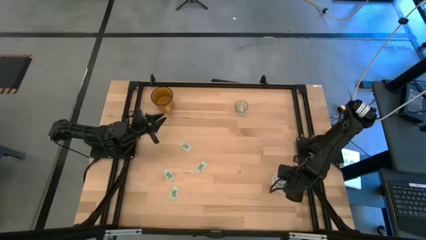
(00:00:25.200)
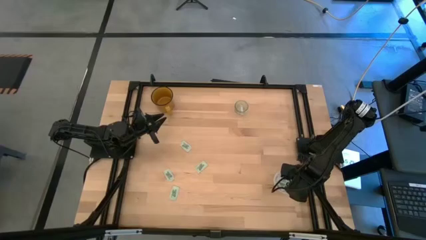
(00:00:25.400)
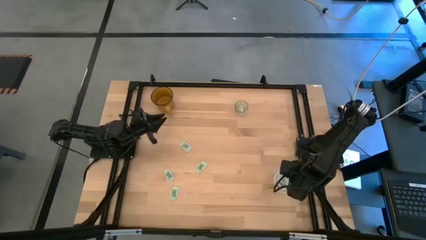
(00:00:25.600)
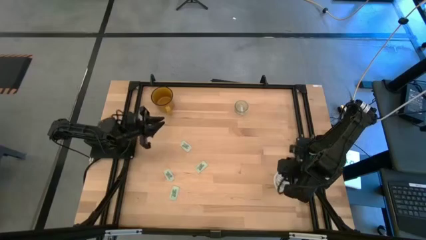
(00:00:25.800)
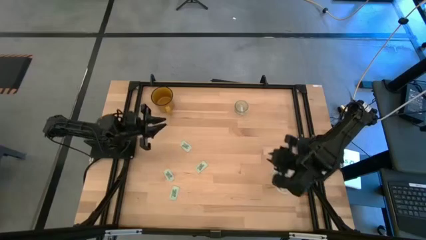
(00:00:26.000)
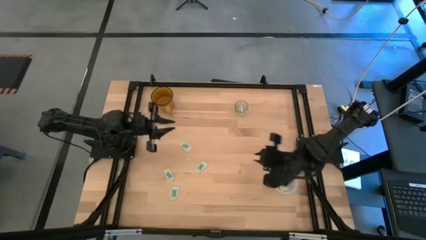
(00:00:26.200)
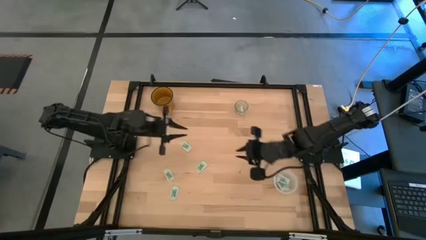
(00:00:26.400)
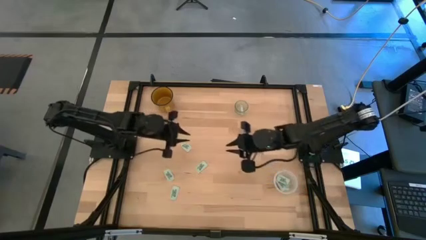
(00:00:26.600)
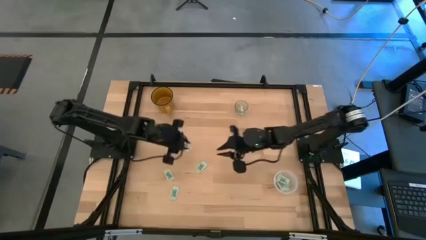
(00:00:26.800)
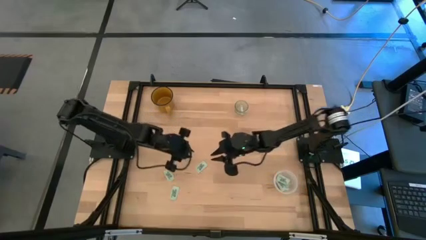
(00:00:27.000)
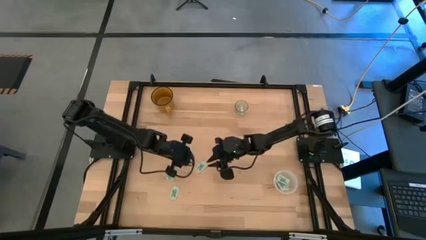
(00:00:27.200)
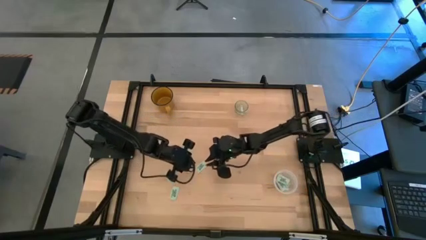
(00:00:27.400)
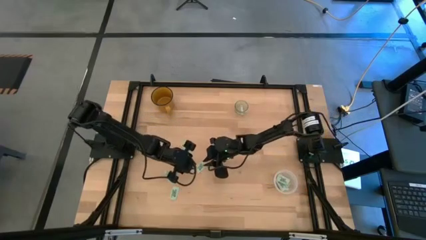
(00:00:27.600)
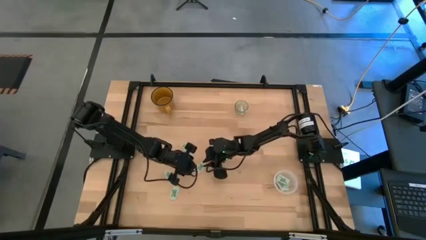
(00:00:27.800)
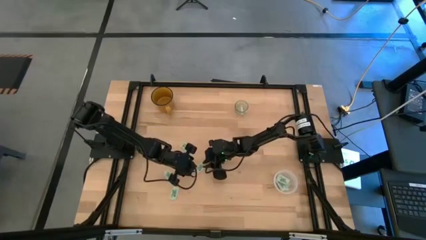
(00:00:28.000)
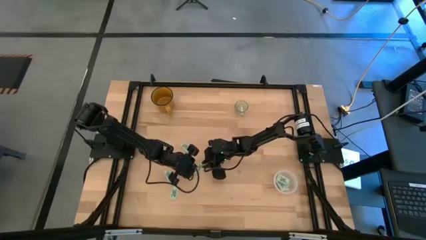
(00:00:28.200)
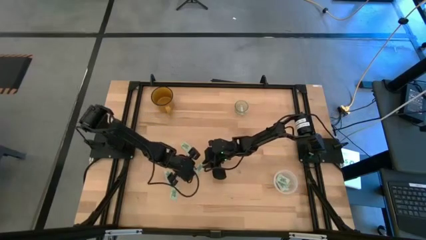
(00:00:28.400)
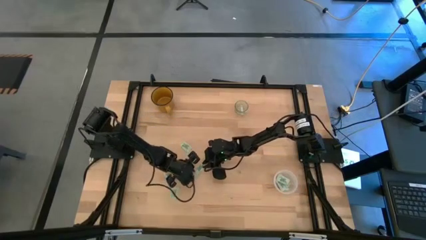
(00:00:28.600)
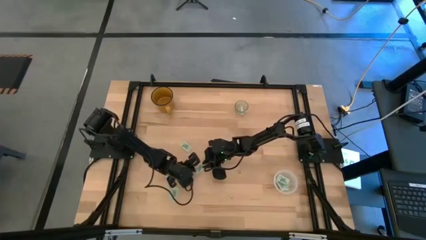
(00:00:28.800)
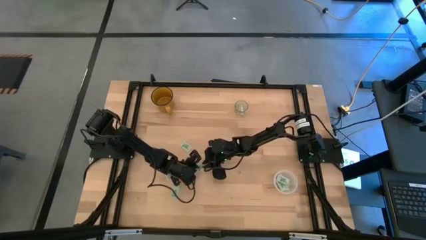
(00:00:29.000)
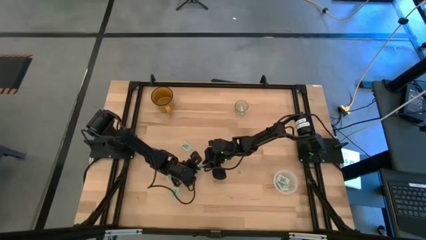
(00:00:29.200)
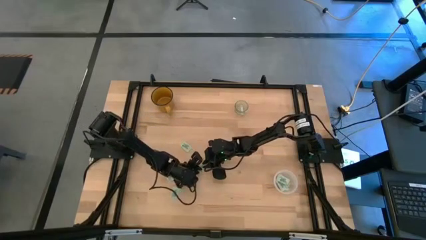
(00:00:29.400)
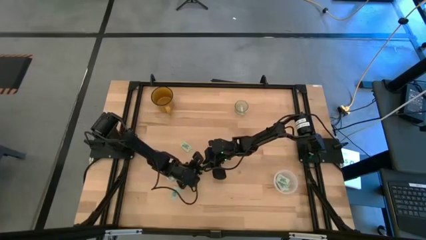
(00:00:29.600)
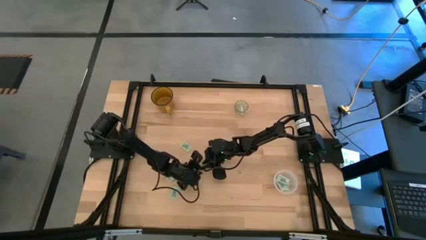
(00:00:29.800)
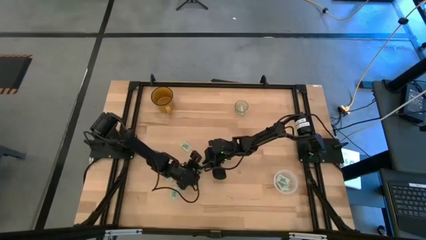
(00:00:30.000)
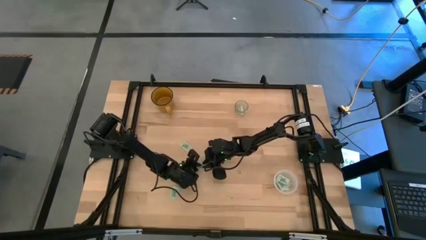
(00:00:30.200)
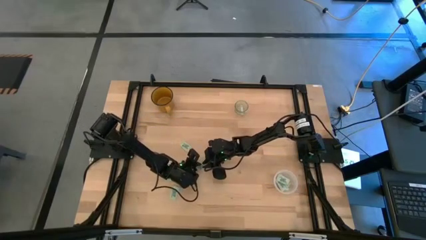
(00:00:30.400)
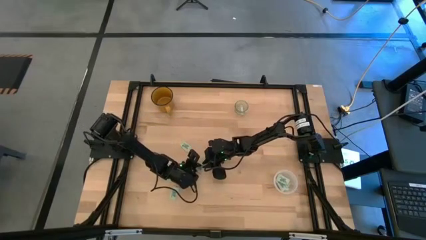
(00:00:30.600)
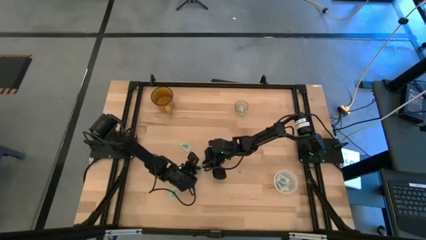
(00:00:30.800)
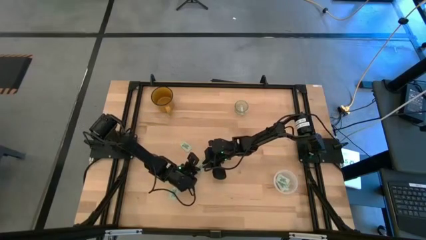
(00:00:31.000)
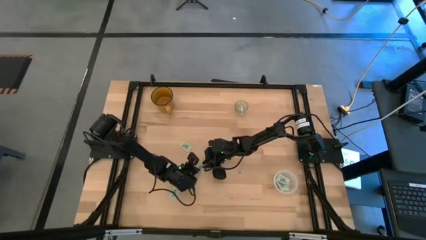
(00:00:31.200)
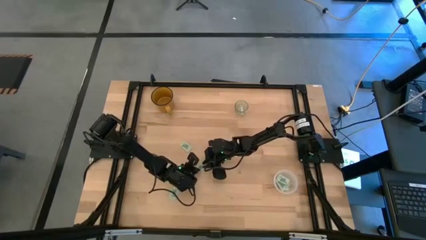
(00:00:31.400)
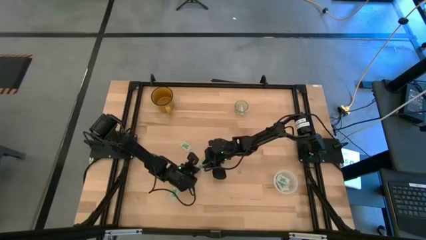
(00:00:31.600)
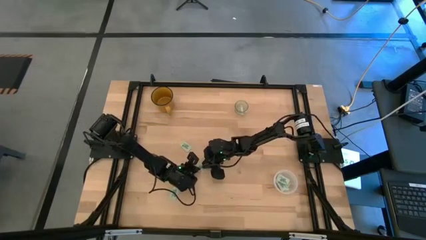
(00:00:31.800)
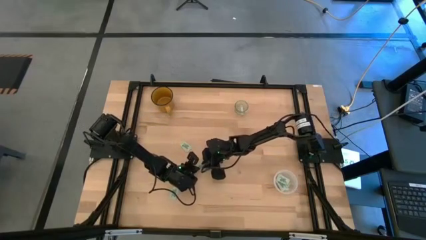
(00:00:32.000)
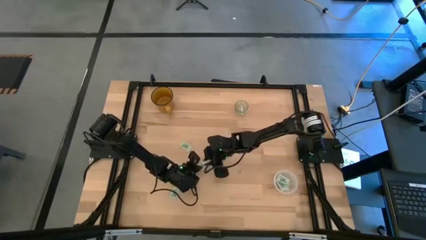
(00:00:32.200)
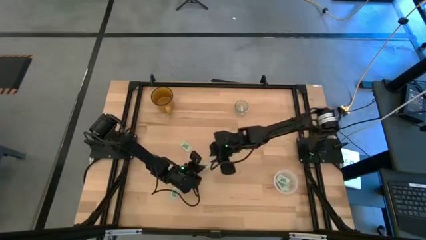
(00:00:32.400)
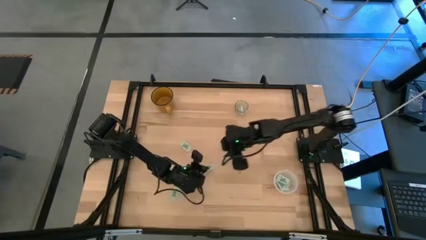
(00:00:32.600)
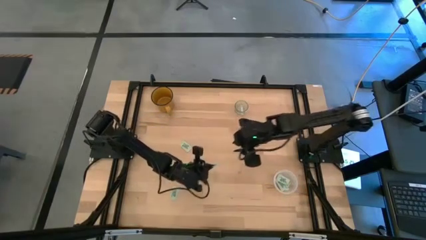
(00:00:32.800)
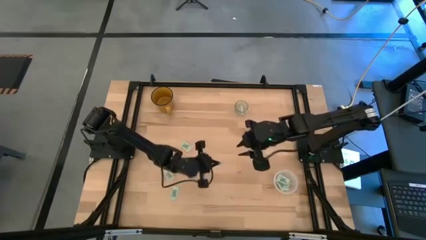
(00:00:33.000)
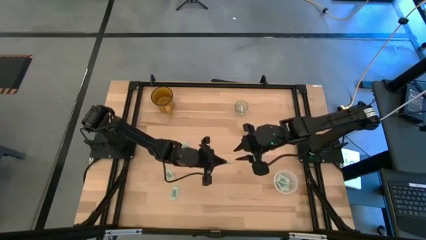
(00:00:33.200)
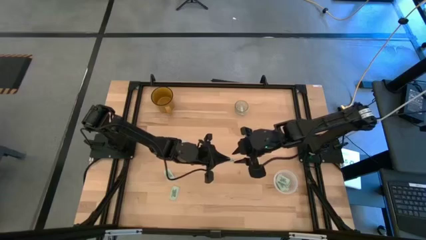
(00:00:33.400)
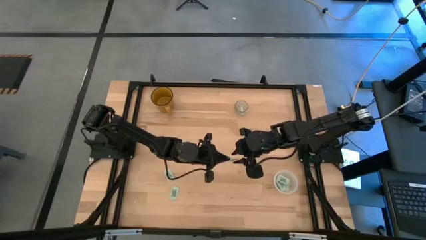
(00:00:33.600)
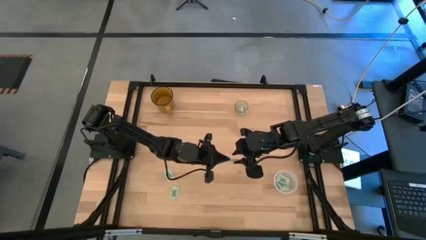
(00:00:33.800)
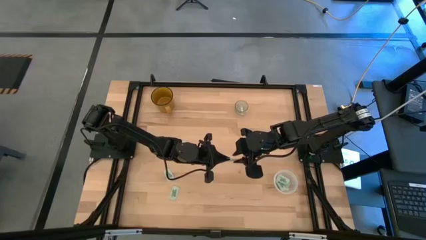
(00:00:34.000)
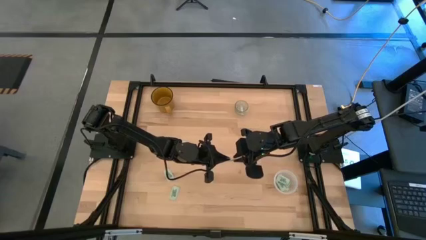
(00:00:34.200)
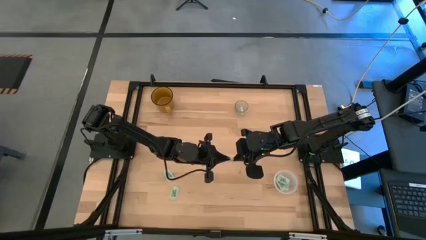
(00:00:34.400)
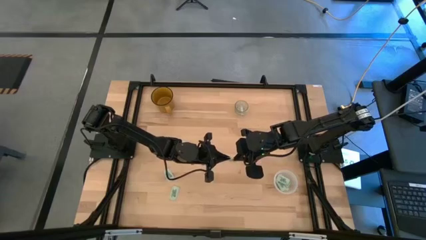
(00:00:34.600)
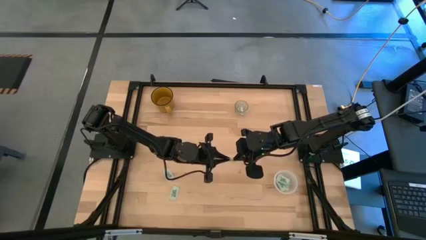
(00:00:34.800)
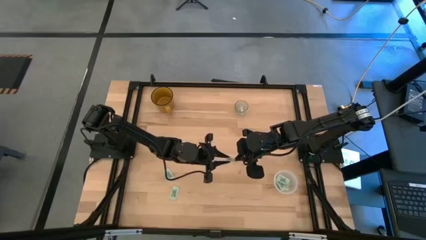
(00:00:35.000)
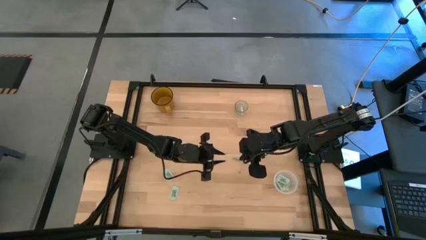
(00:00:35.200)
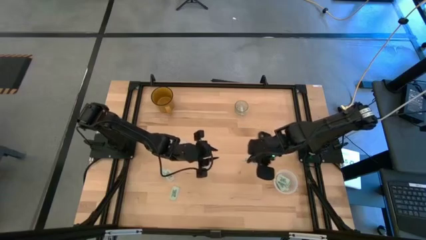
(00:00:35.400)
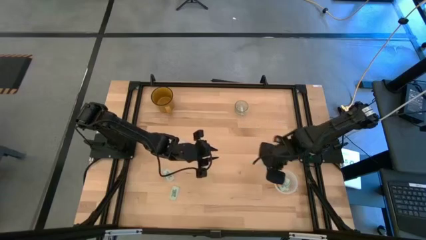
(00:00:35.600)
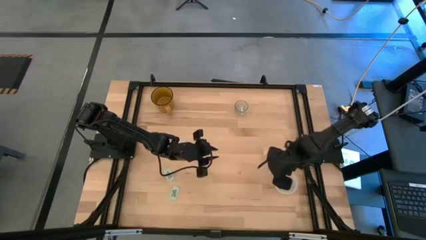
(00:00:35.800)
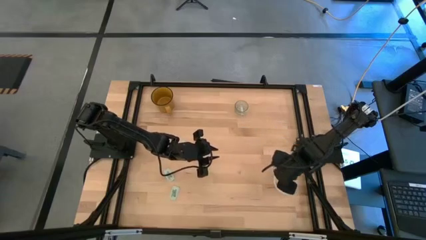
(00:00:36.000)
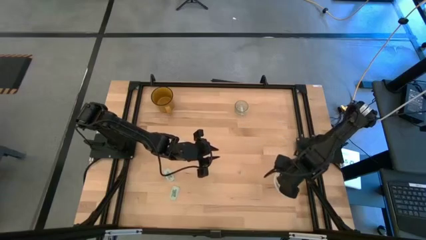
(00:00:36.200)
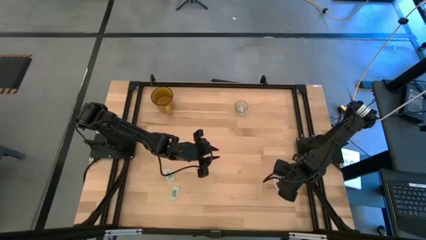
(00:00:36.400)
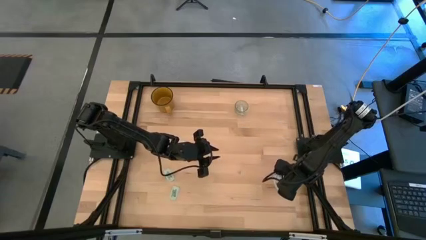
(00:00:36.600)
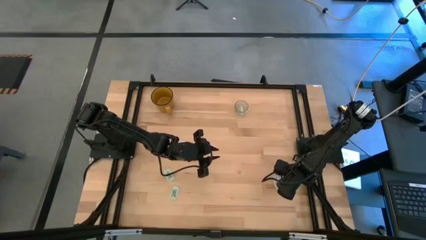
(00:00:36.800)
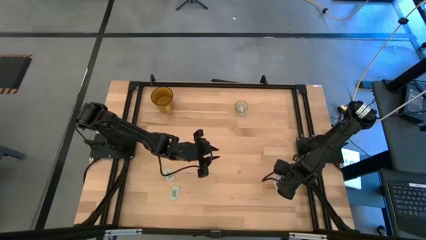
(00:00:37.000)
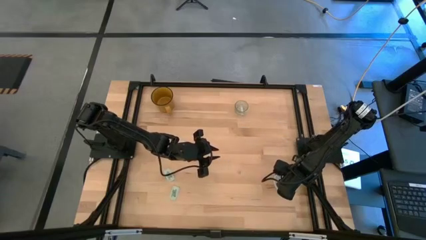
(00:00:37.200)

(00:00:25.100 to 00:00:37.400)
Task: Pick and place Stevia / Truvia into bins
Put the stevia packet into the transparent container
